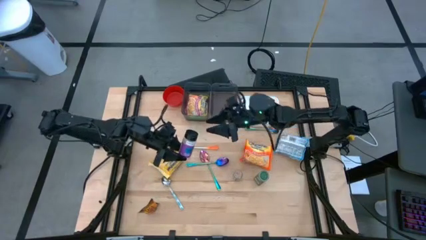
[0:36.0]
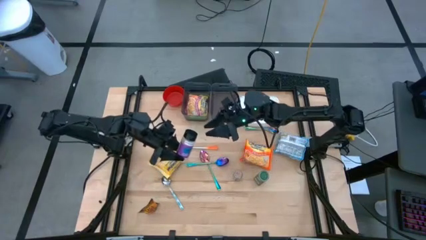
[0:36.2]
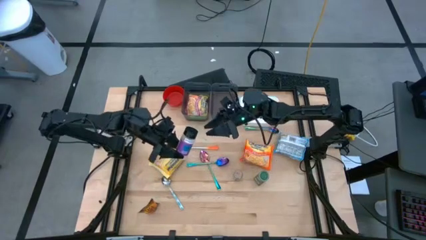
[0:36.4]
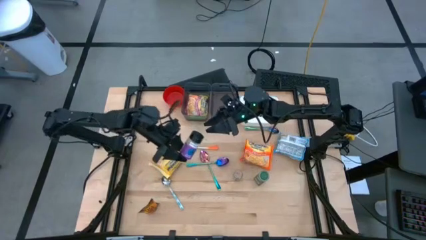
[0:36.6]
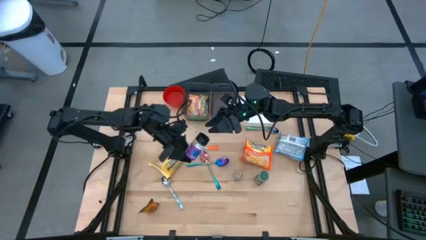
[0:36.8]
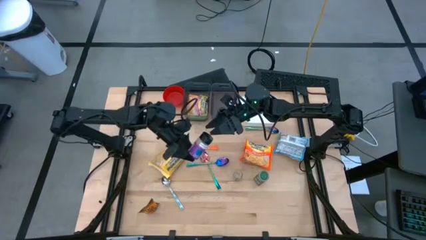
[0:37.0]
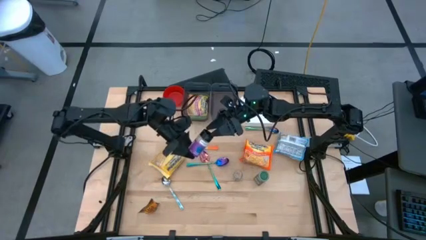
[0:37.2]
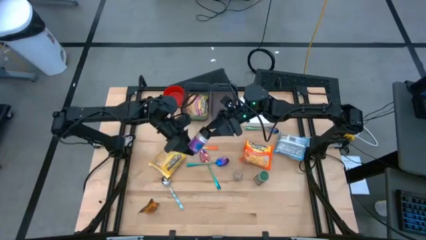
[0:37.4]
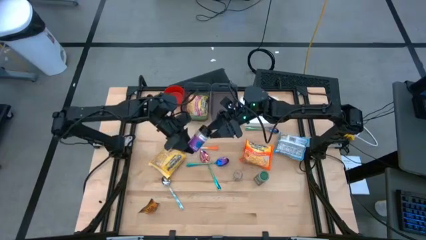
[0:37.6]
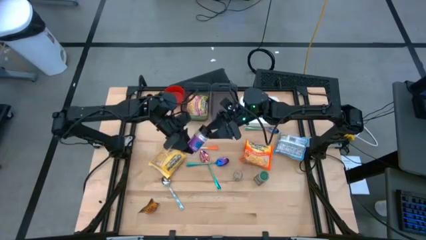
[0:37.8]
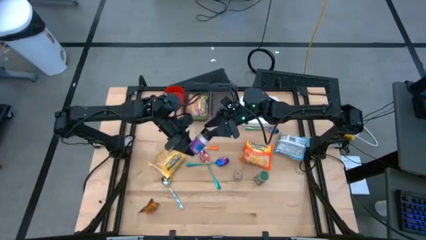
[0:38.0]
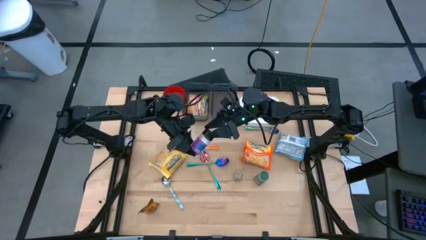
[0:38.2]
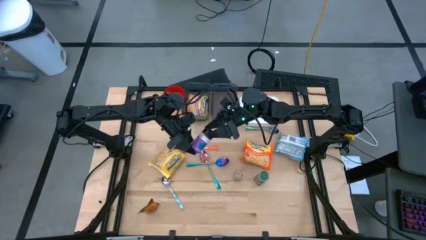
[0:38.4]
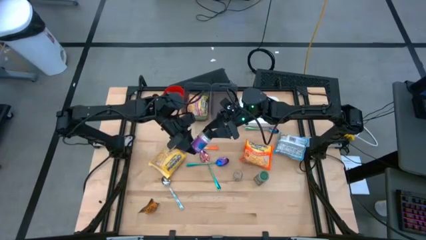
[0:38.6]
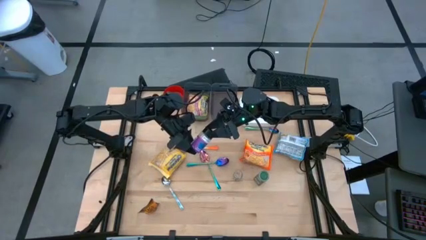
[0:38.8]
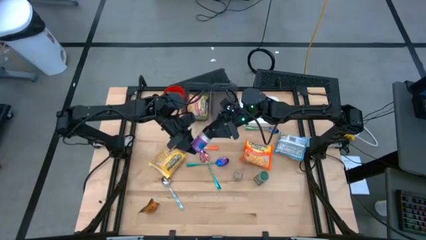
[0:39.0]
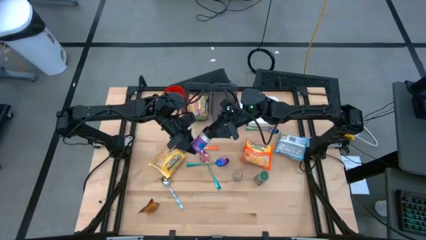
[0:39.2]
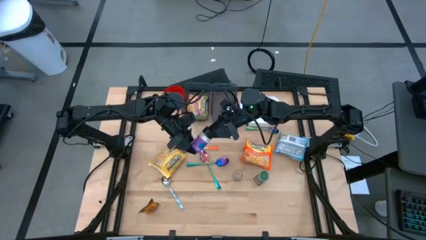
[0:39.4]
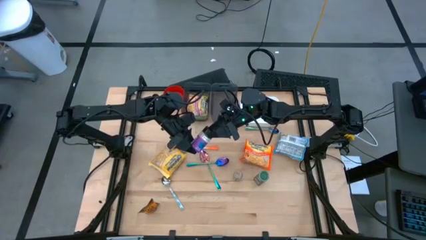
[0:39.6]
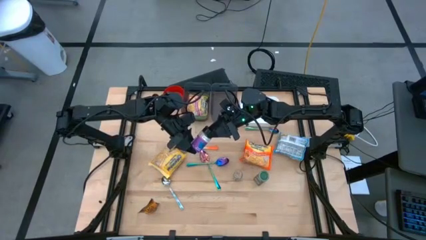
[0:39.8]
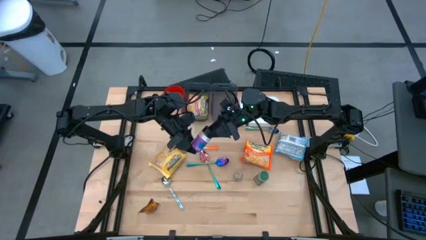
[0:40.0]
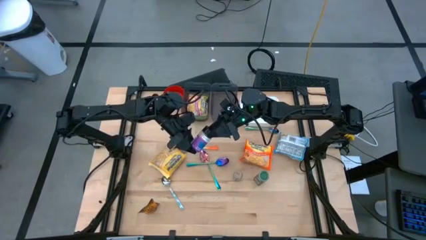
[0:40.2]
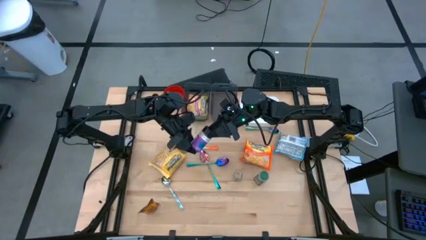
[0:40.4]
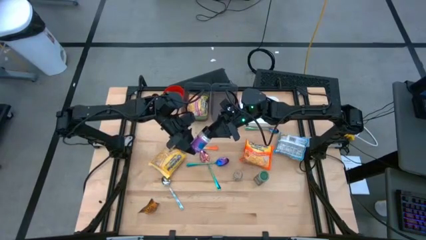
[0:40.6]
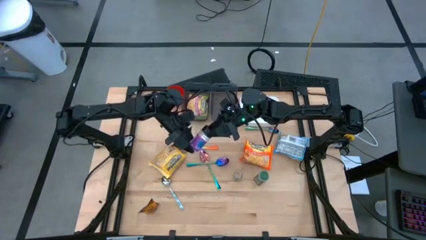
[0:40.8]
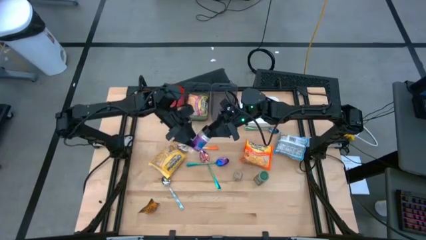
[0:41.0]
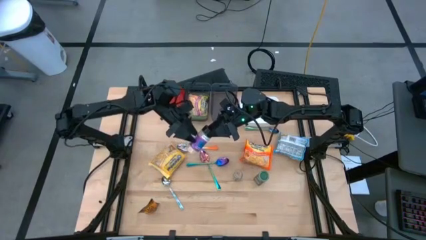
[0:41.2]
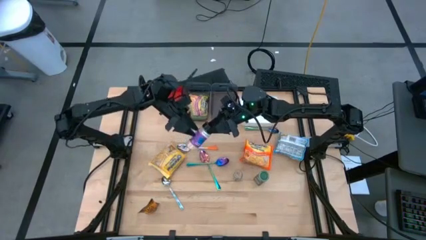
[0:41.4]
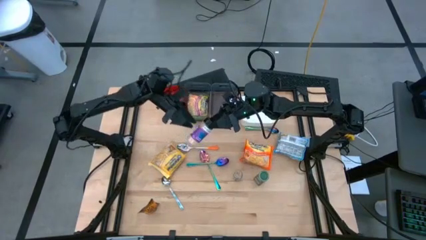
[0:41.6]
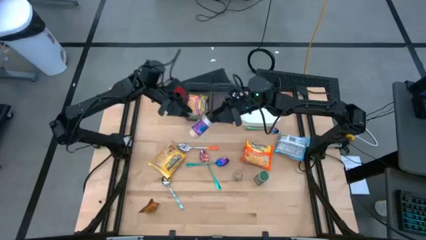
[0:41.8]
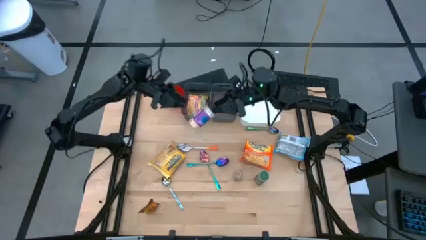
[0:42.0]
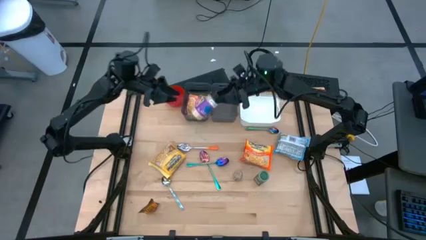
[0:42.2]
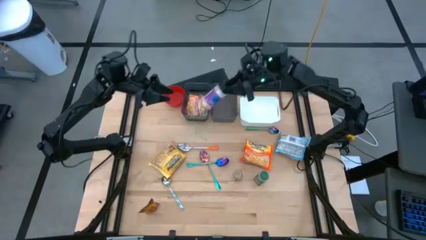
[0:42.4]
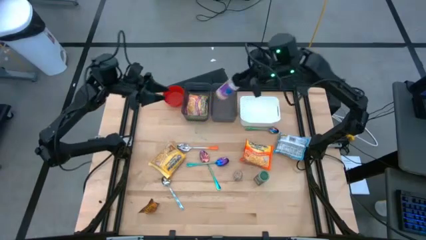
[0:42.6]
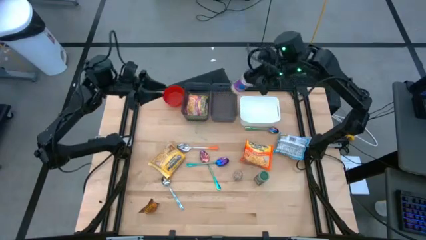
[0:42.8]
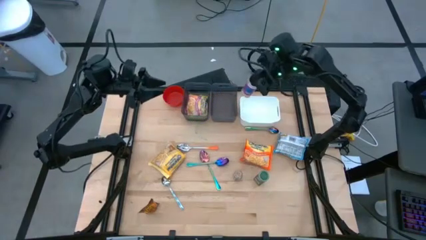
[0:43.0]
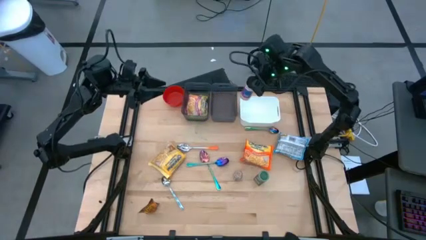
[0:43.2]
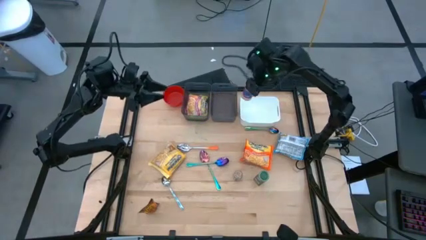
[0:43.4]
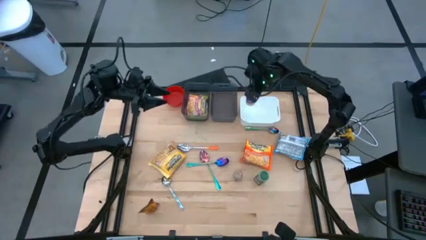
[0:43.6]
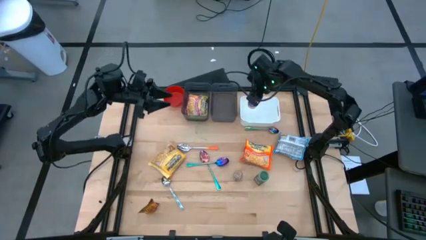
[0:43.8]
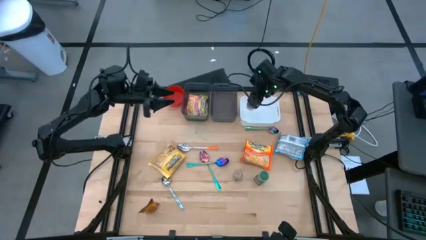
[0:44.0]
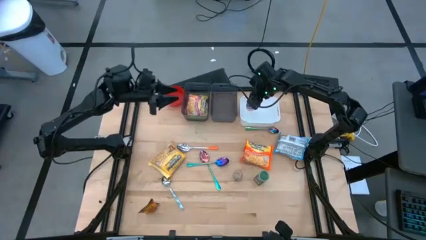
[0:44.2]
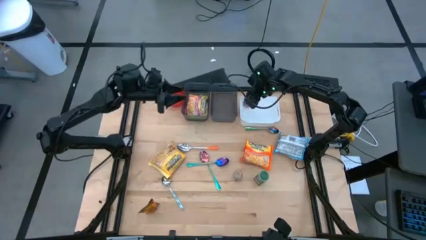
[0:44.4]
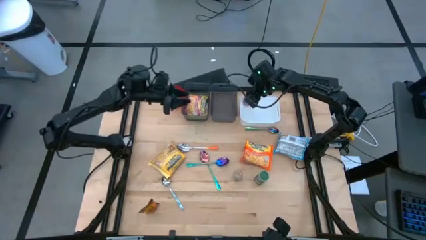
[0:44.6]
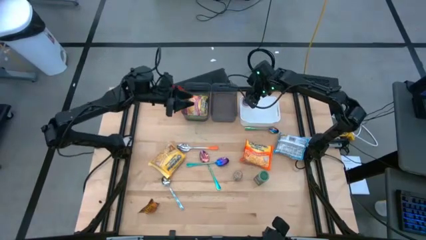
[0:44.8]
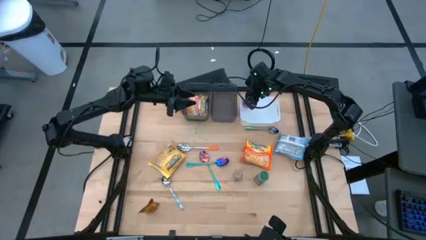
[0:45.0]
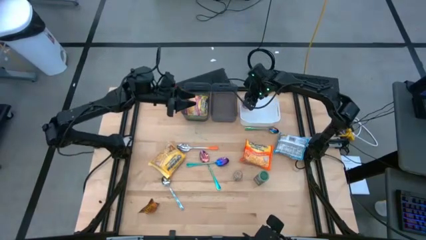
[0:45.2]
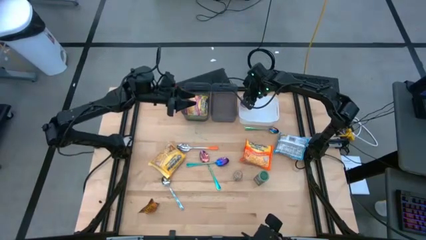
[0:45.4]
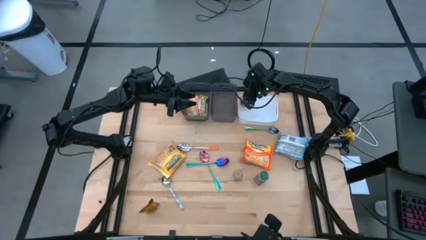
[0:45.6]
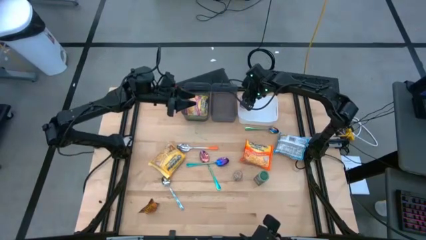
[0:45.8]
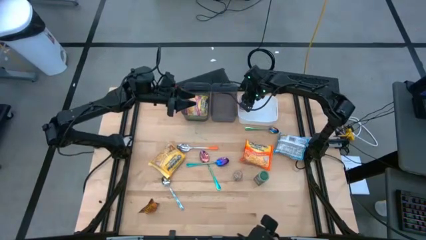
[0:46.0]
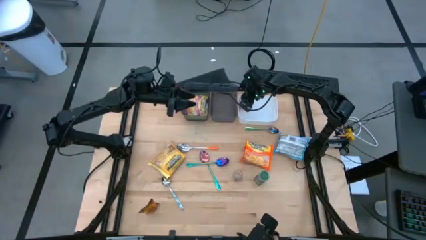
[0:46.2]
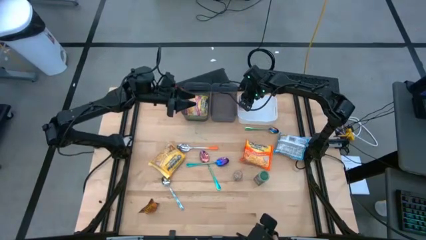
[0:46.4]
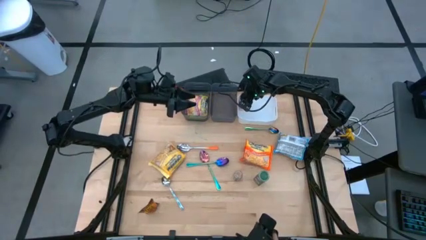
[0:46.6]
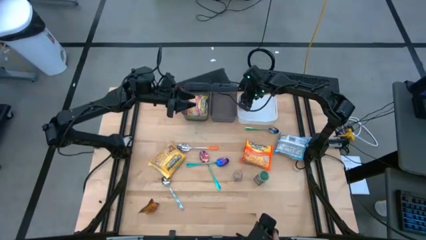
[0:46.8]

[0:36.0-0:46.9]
Task: Pick & Place Food Item
Put the black seasoning bottle into the white bin
